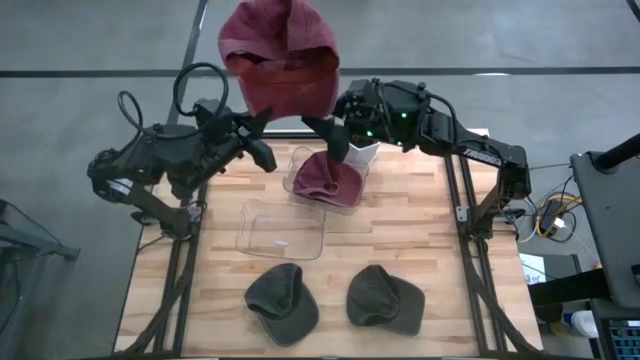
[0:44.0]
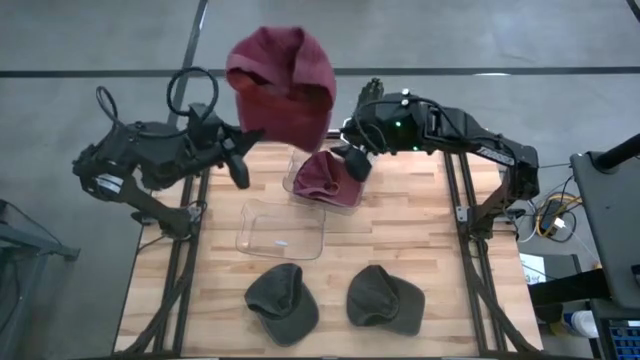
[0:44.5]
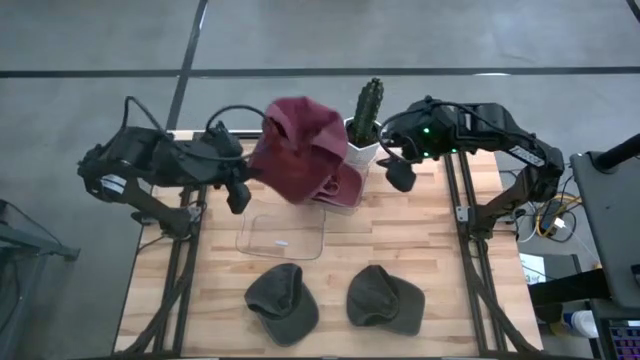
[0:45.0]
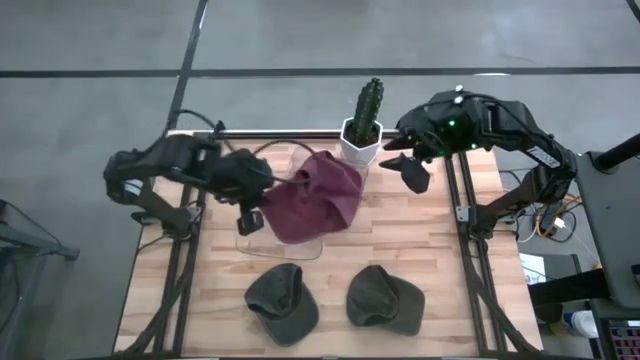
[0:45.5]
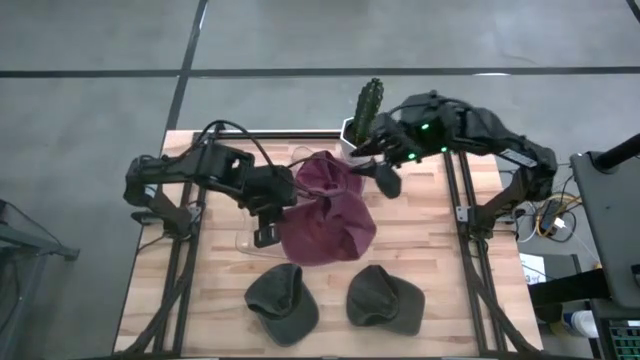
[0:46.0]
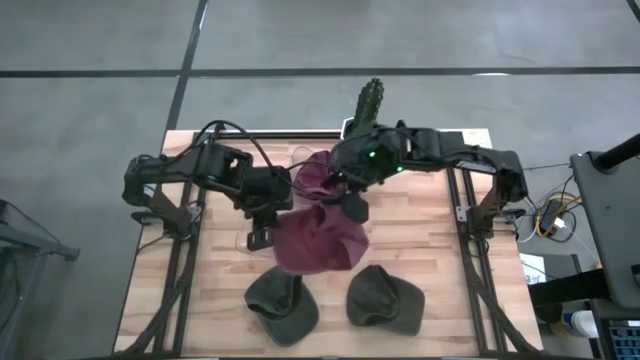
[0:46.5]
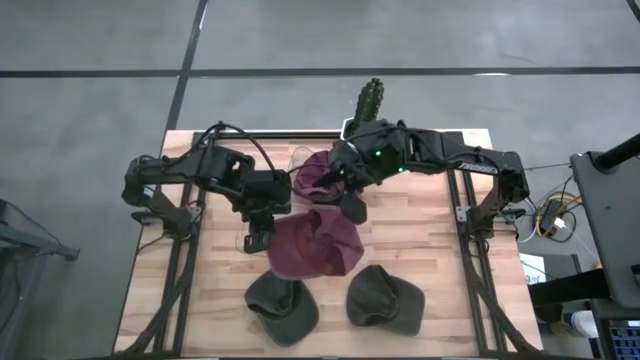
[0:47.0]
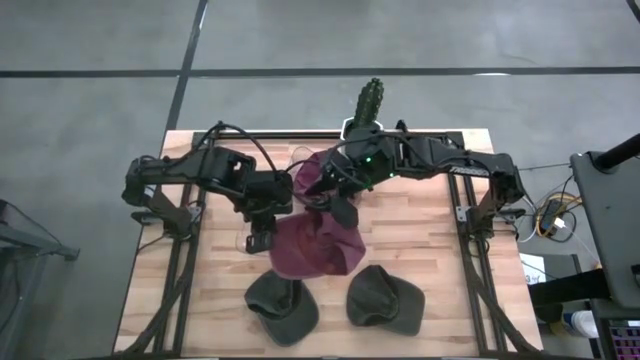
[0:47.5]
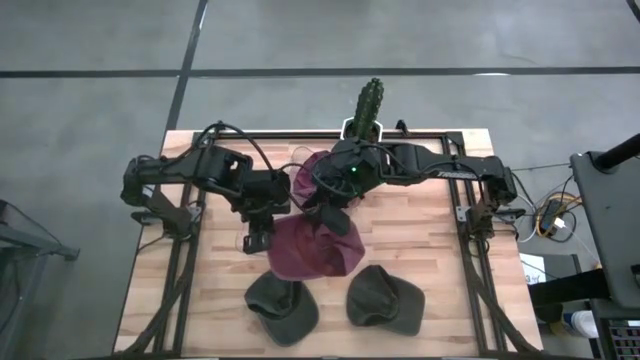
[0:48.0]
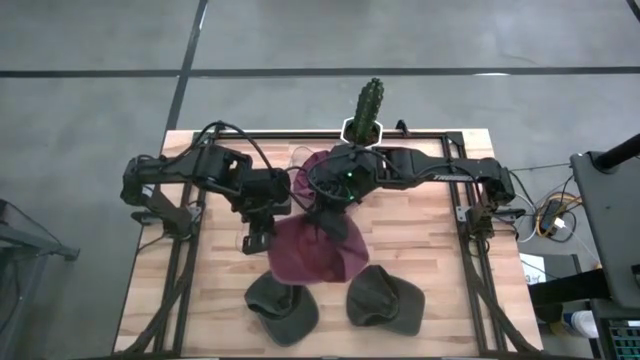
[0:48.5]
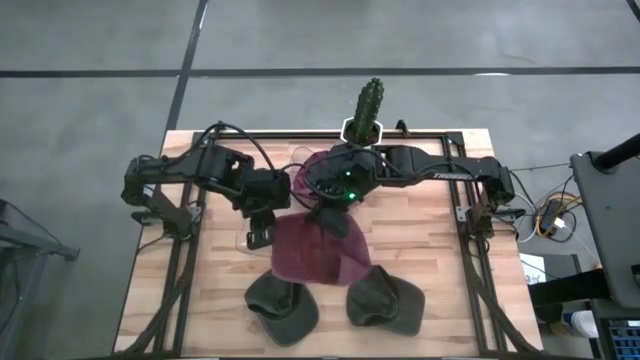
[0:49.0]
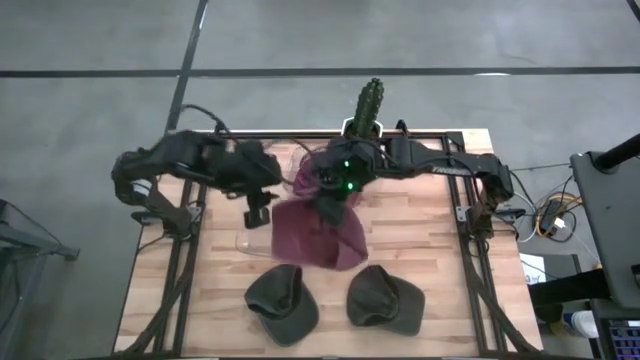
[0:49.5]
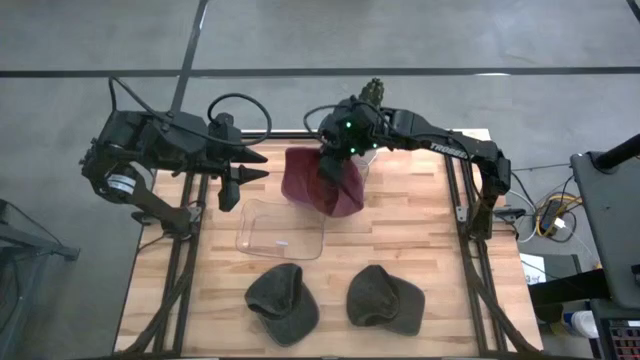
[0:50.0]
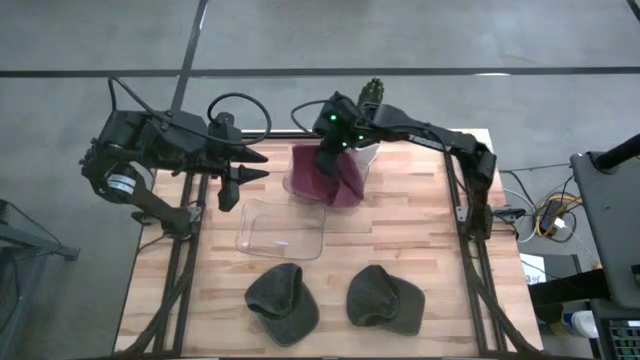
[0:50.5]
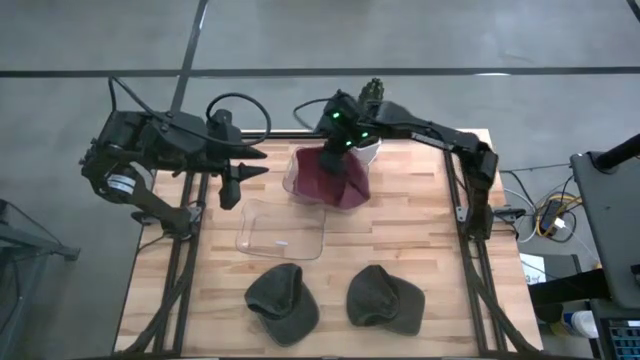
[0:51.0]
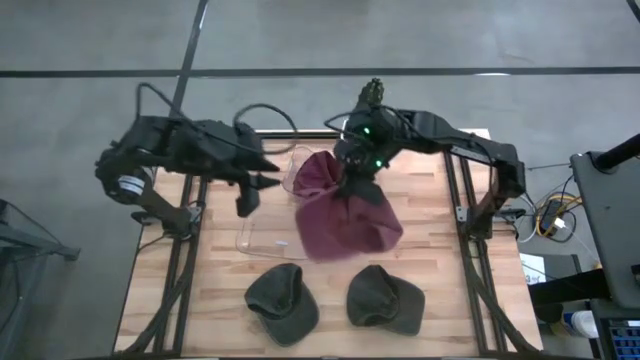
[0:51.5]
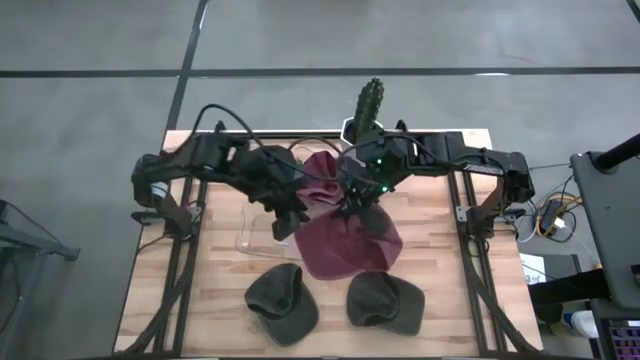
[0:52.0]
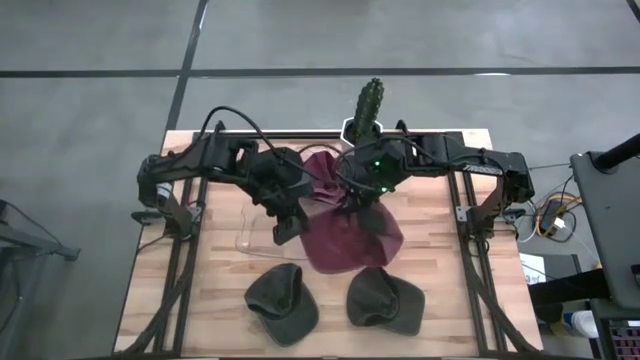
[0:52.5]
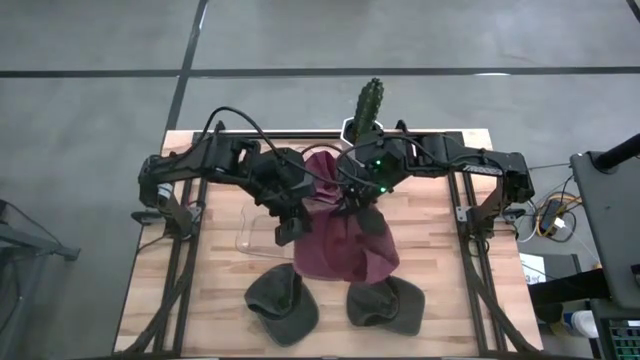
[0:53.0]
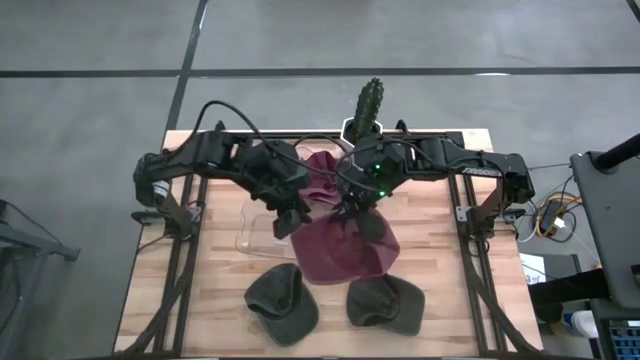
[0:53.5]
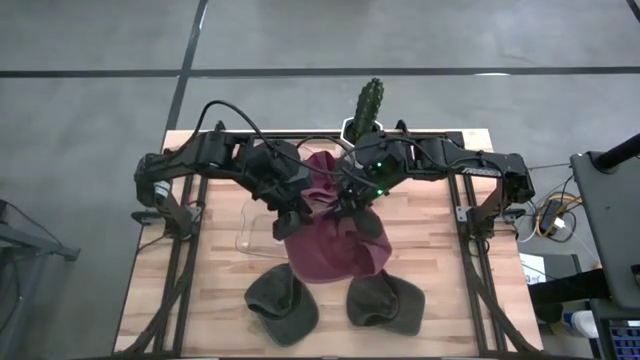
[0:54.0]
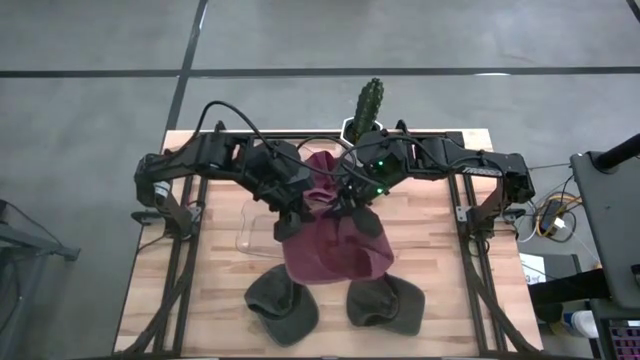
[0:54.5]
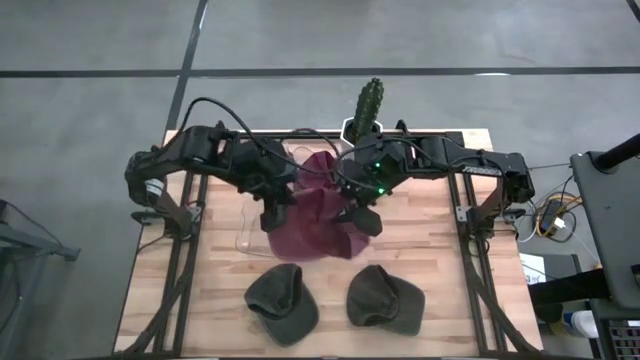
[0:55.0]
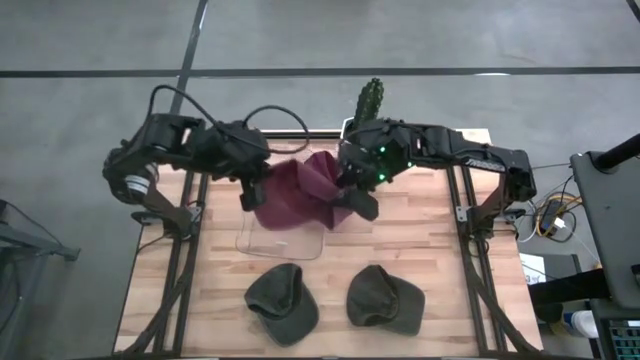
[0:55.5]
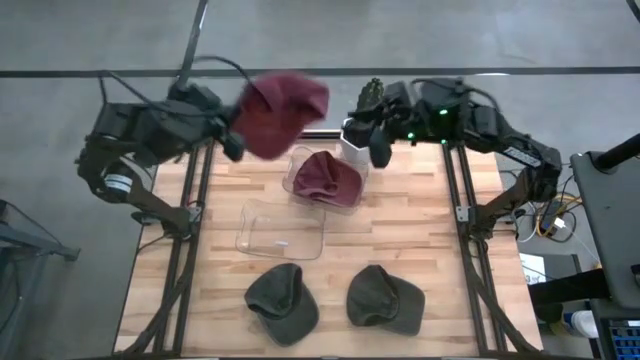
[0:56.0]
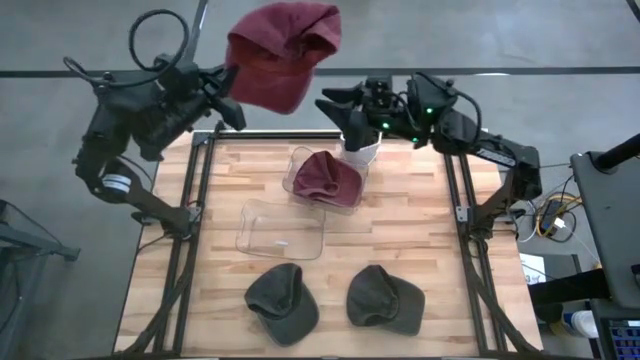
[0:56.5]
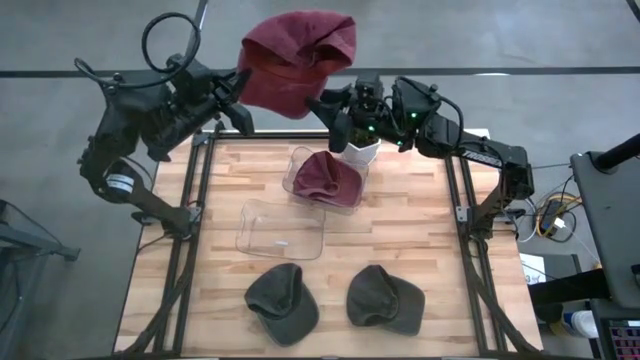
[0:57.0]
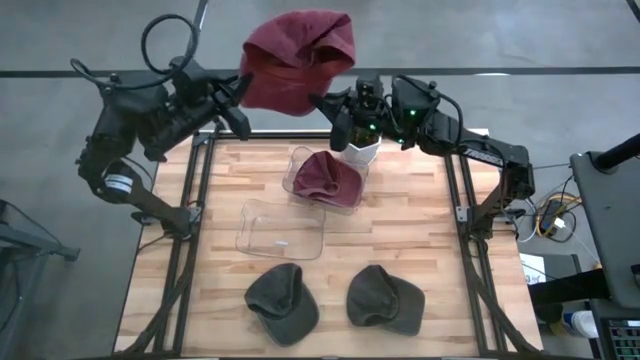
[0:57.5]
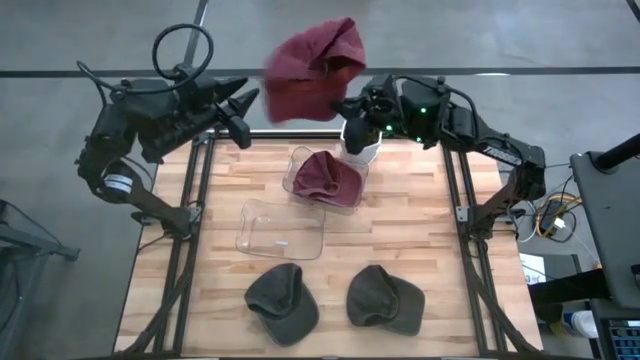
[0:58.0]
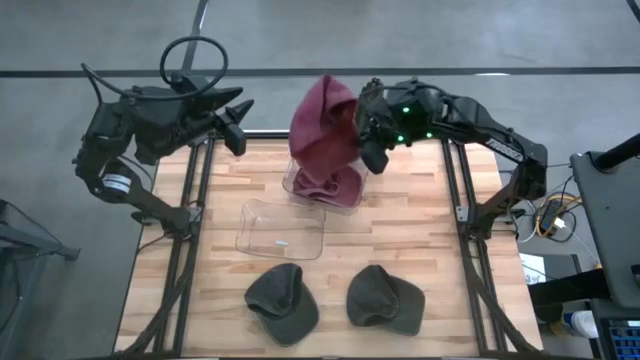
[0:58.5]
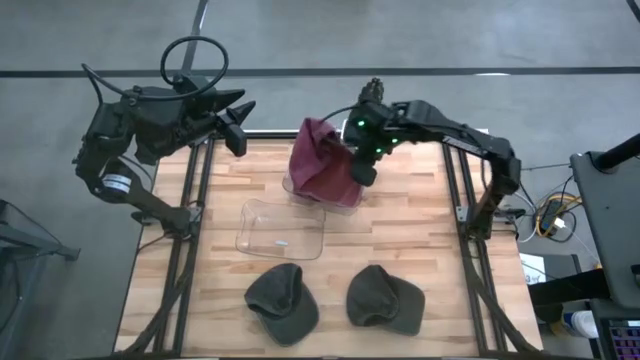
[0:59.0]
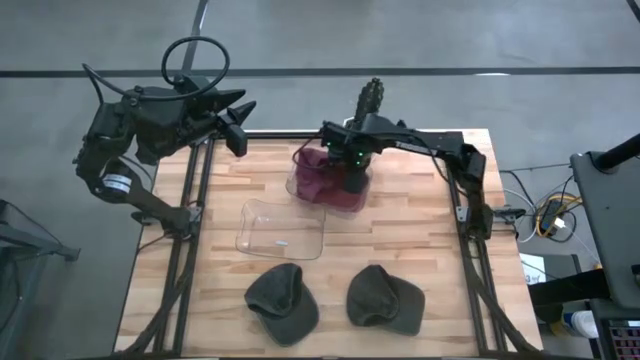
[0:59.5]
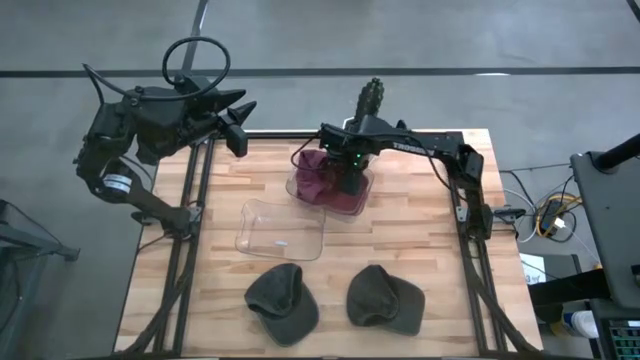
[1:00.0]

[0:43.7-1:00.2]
Task: Pick & Place hat
Put the red cap into the top transparent bin

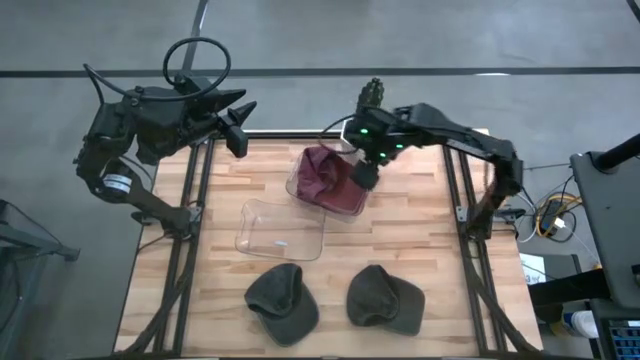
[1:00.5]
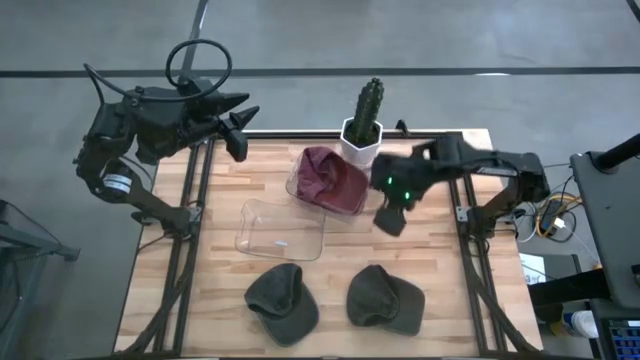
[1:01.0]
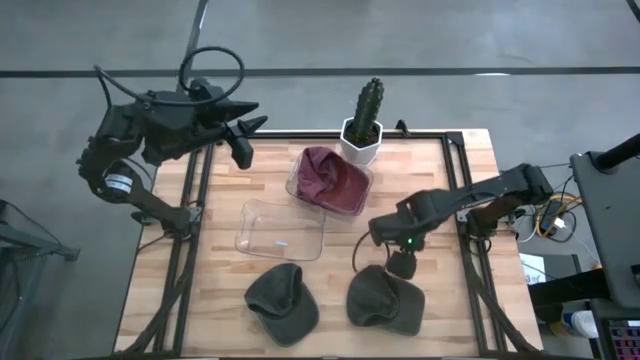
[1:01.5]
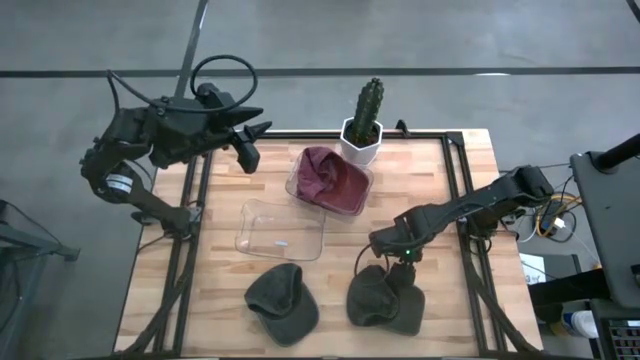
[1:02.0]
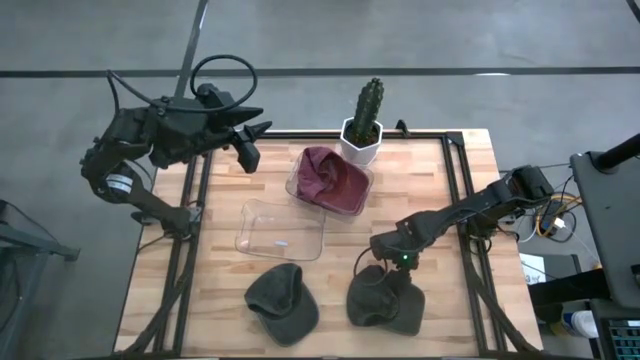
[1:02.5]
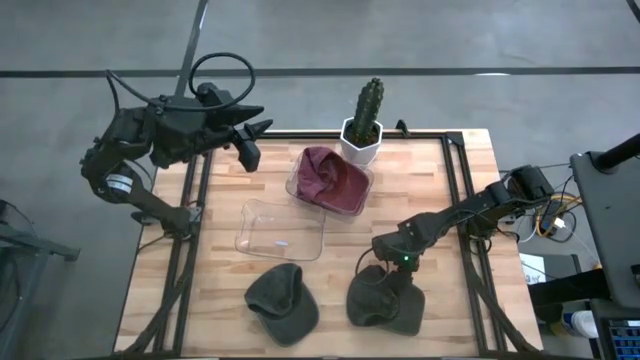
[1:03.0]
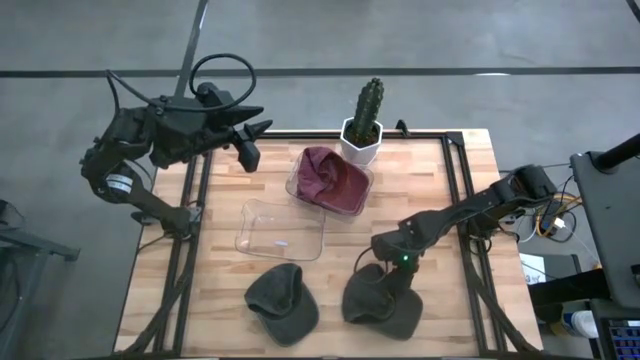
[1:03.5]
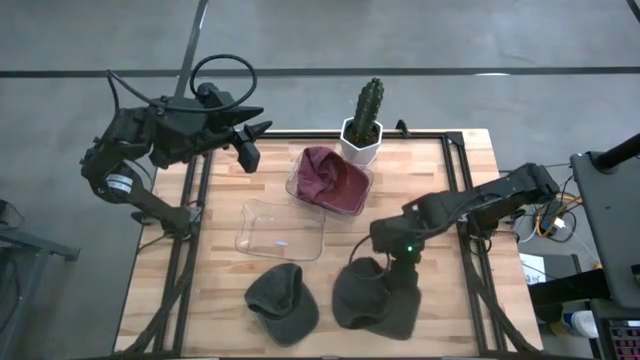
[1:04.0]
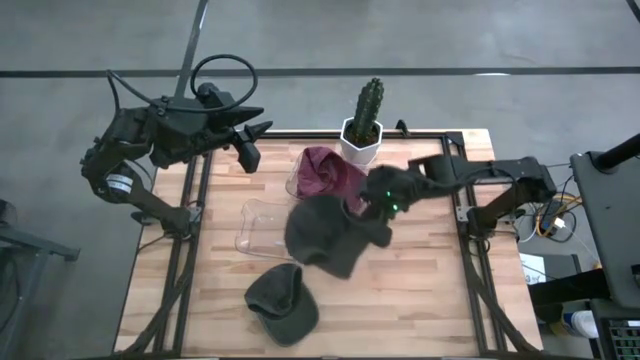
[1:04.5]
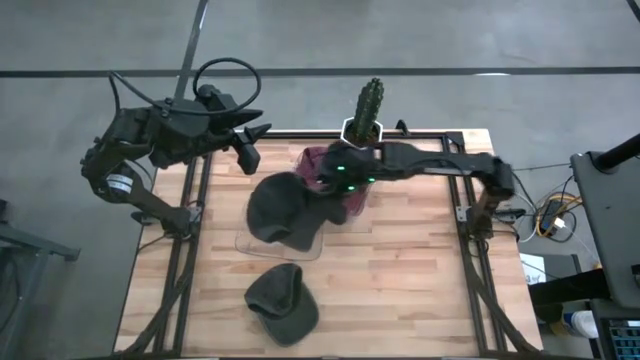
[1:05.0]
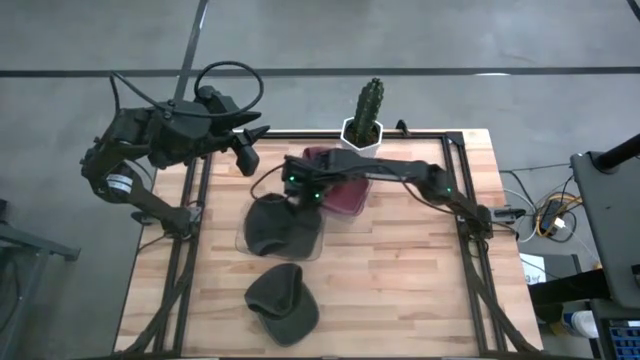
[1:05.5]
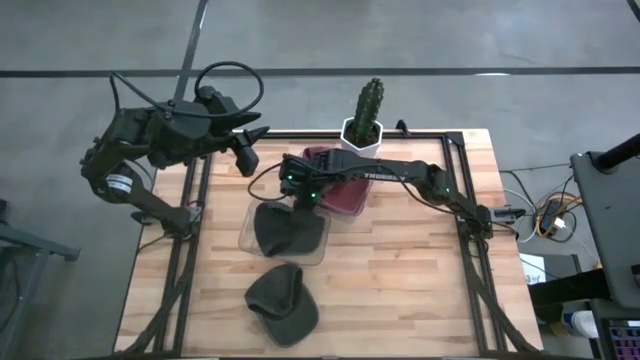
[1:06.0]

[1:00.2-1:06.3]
Put the right black cap into the bottom transparent bin
